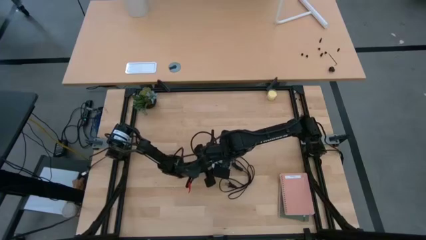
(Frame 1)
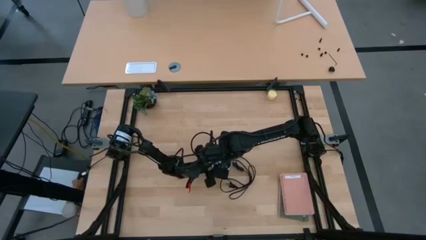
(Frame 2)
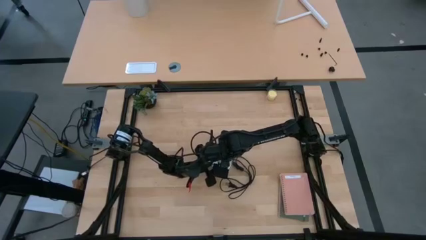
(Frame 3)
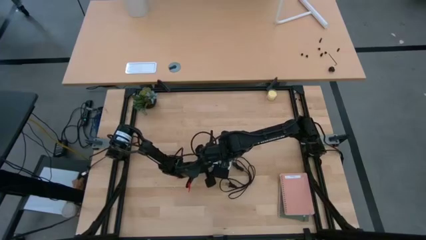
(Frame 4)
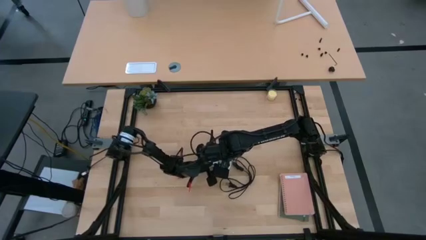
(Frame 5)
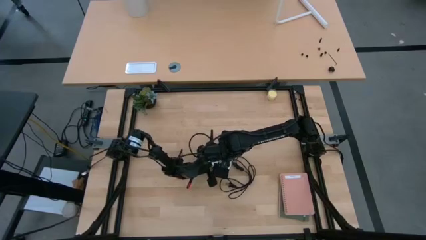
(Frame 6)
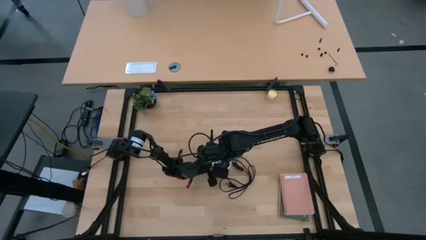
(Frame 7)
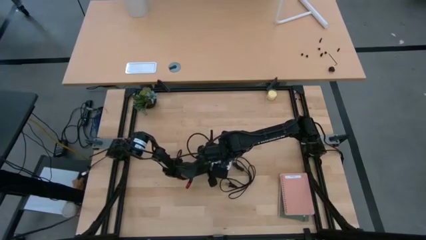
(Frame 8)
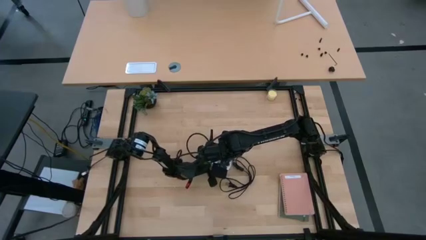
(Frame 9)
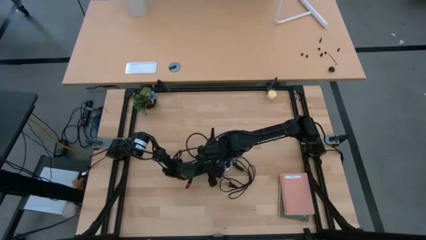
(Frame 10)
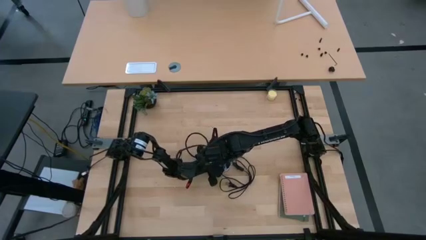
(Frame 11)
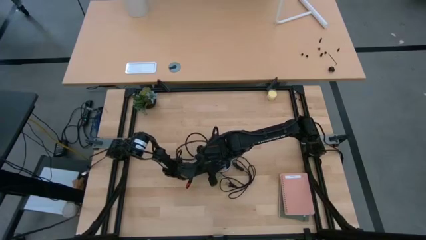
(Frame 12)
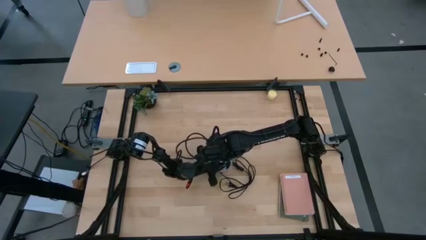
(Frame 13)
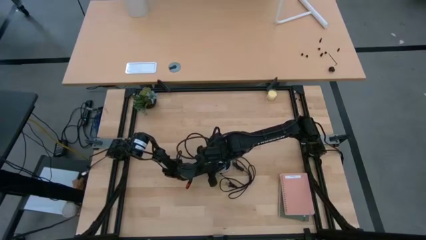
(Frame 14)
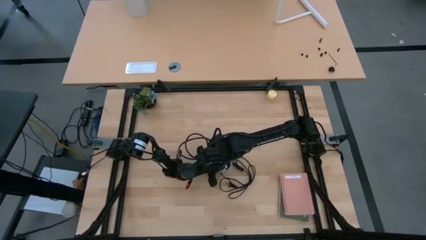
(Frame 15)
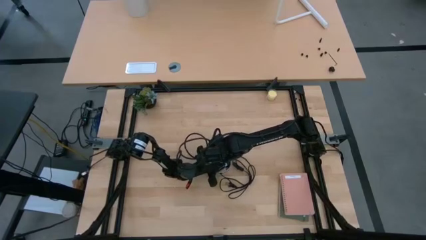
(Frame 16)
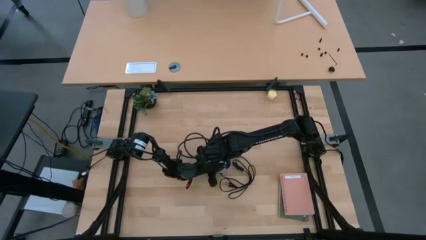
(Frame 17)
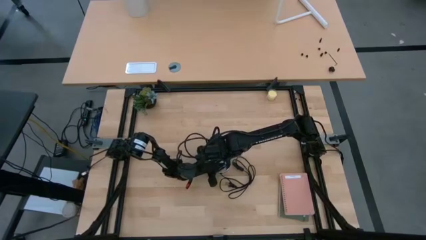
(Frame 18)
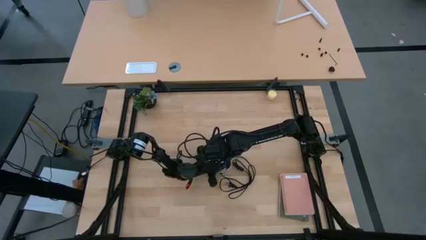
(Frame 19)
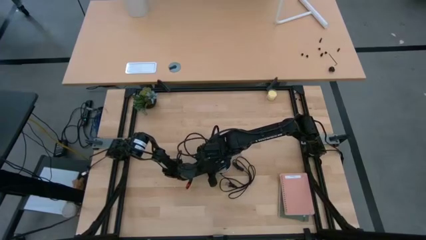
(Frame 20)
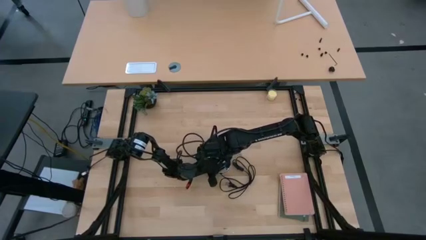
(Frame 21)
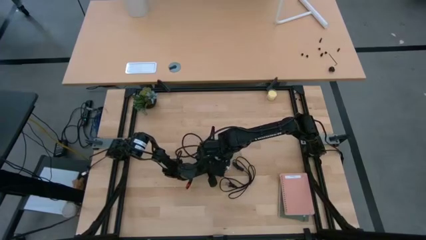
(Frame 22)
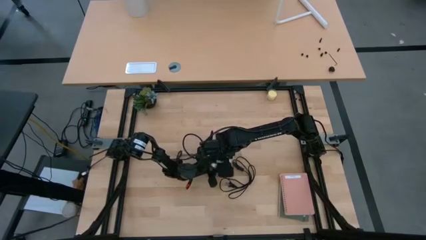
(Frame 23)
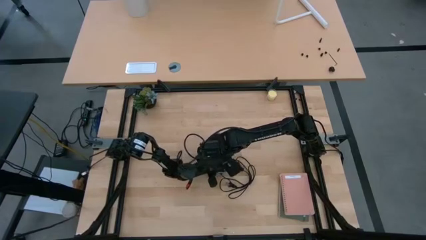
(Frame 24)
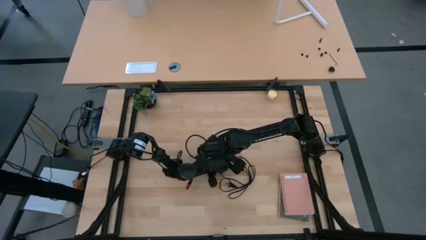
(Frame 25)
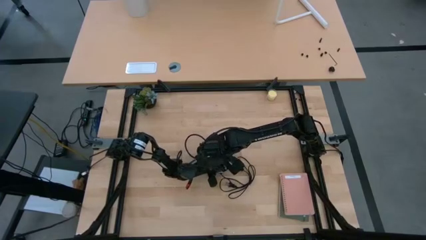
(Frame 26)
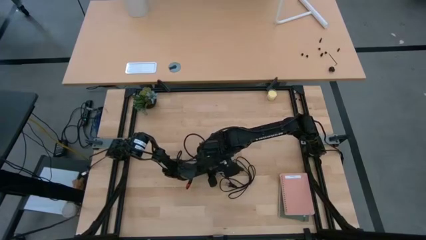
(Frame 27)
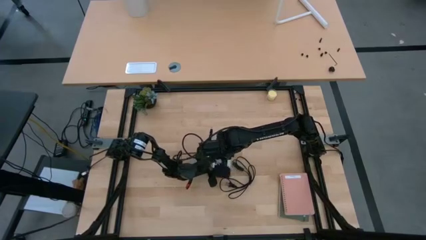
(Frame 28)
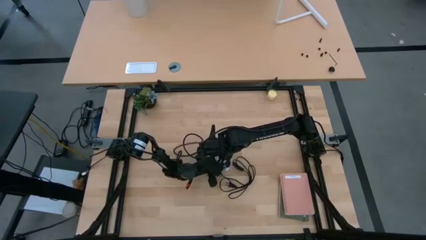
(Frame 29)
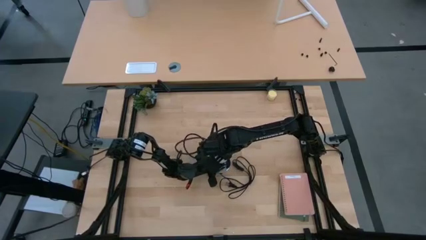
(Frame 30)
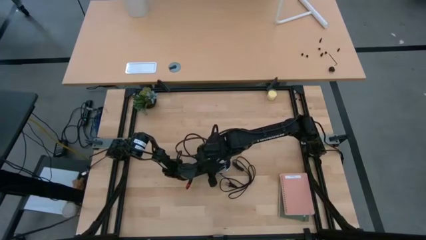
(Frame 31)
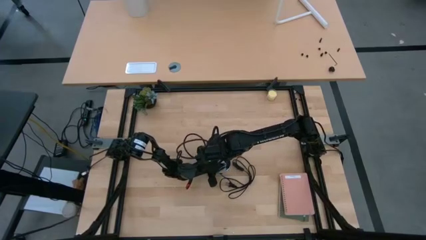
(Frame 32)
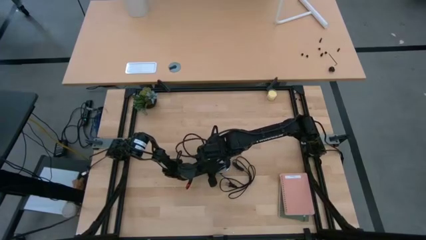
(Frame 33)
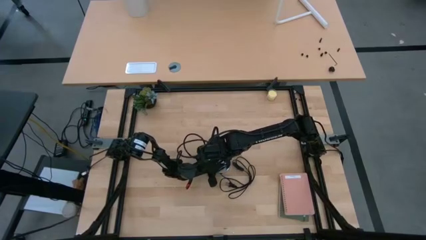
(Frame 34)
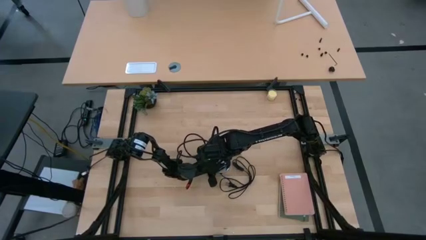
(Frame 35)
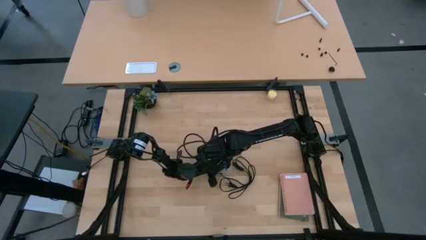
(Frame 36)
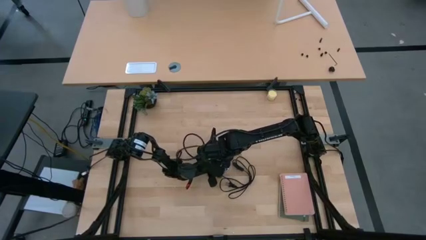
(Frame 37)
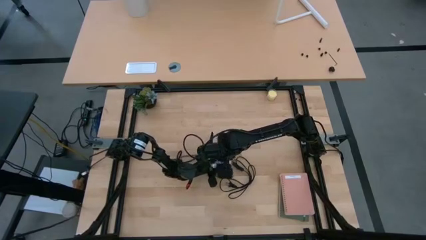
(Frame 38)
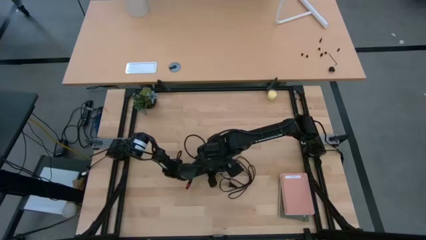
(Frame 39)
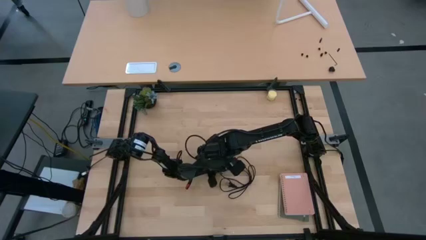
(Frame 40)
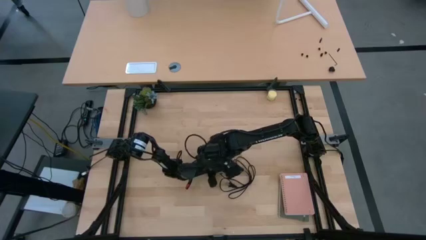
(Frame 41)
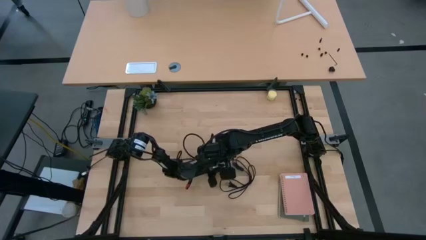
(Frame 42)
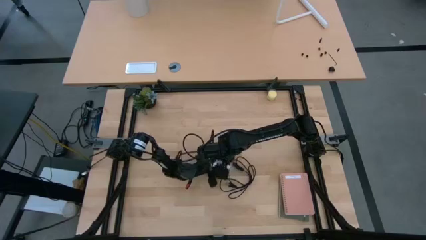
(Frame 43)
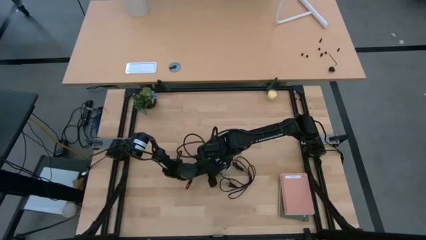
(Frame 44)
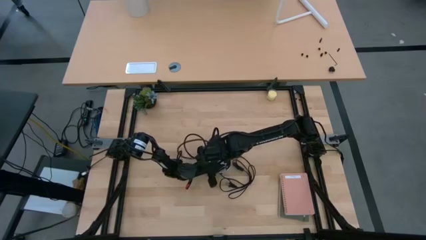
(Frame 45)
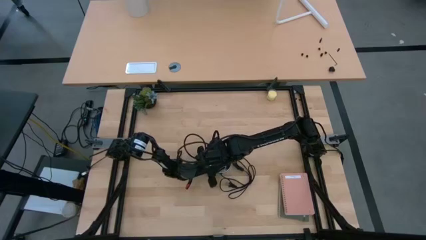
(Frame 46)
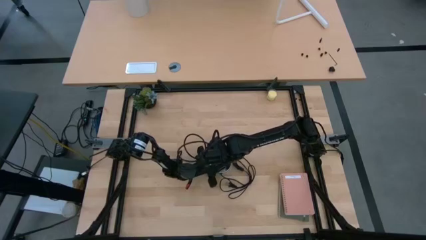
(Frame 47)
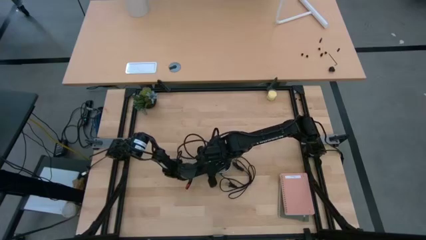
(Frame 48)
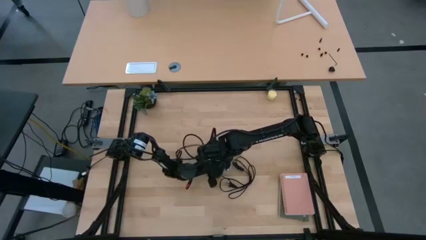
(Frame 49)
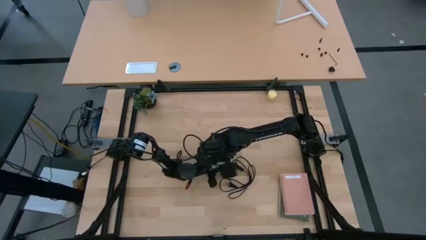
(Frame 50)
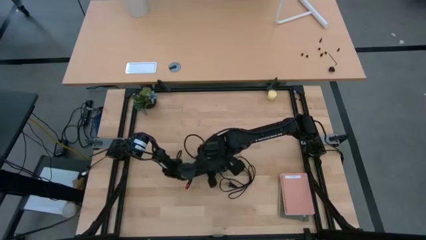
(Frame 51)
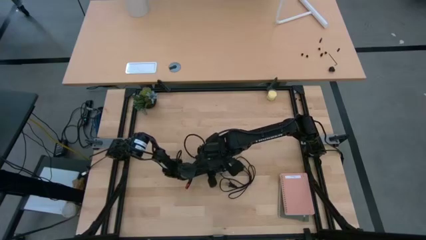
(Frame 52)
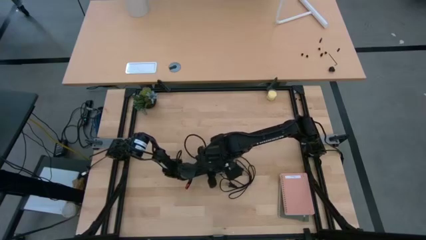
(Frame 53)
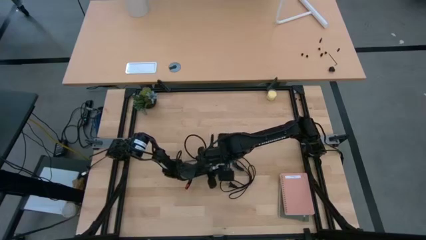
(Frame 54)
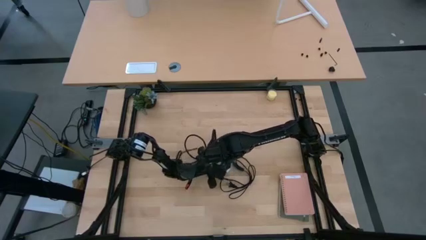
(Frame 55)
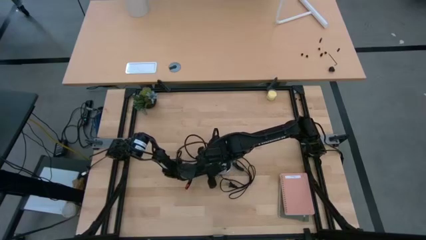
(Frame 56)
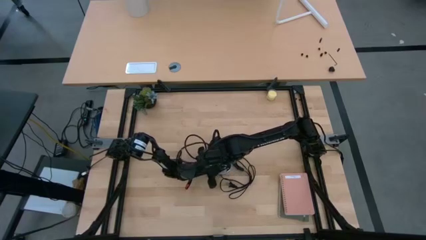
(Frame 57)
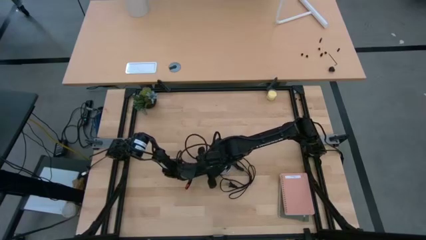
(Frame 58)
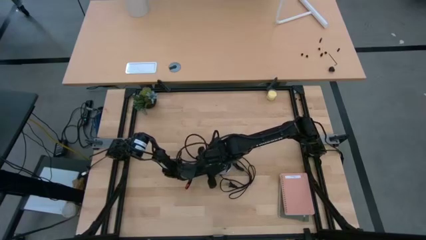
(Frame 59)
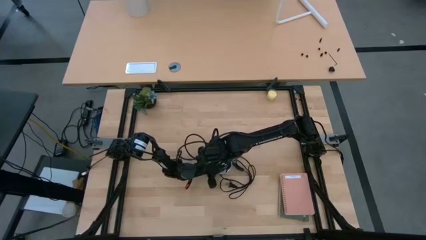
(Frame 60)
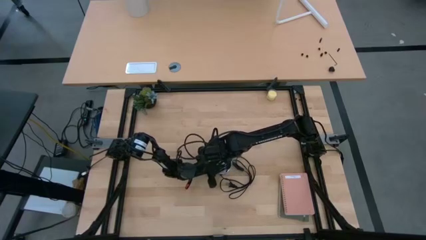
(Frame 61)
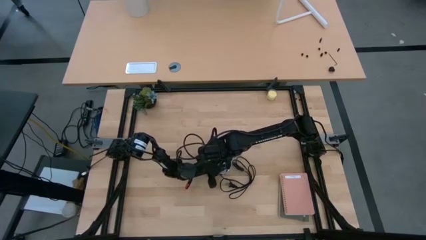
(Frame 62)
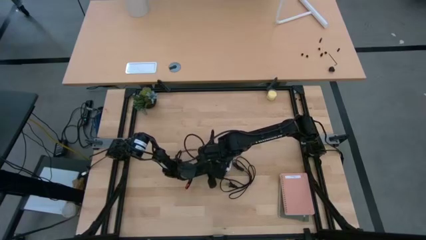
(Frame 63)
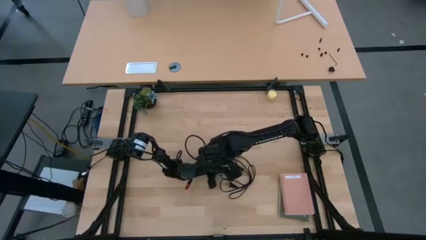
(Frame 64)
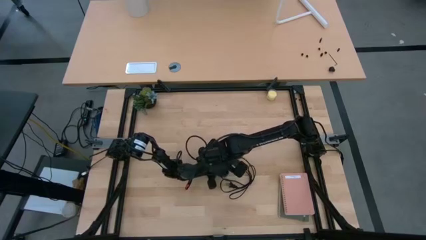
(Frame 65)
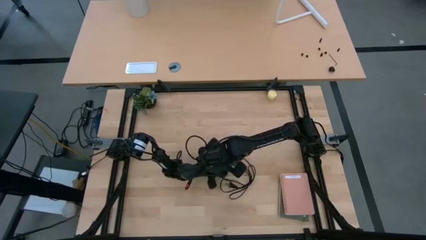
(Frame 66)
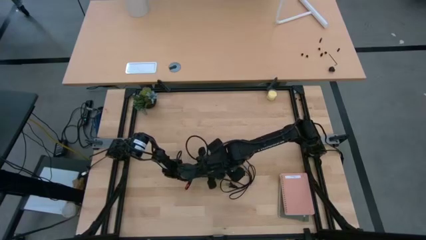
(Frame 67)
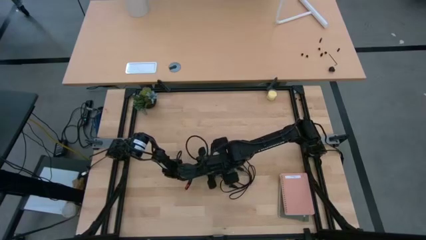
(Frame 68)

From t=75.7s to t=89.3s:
Task: Screw lightbulb
Remove the light bulb from the lamp

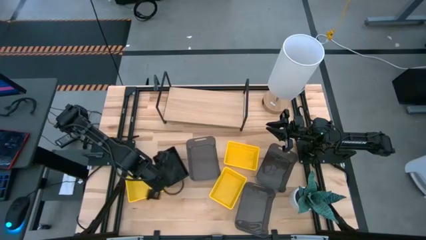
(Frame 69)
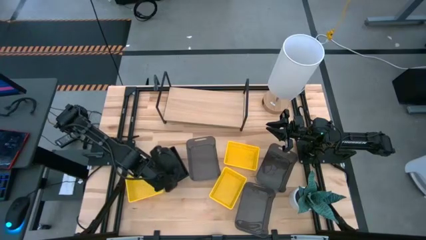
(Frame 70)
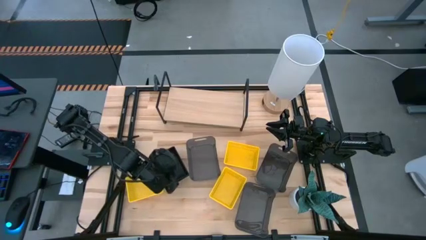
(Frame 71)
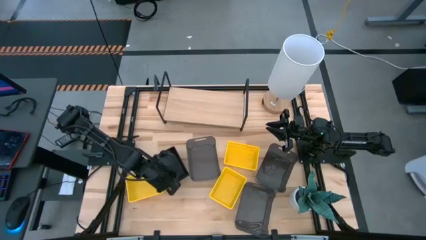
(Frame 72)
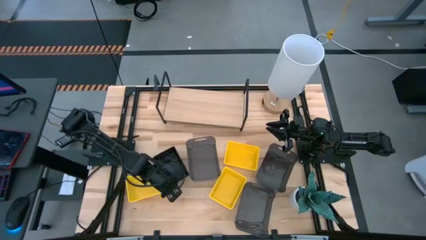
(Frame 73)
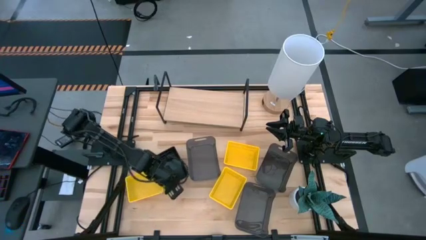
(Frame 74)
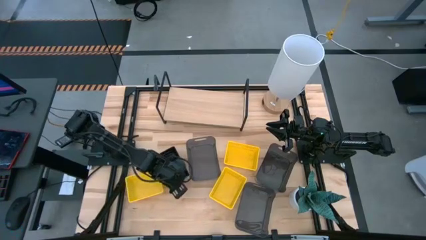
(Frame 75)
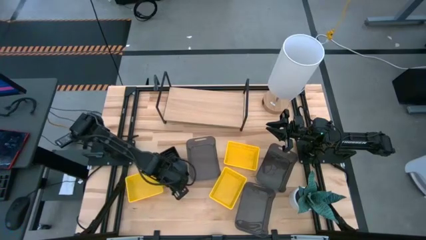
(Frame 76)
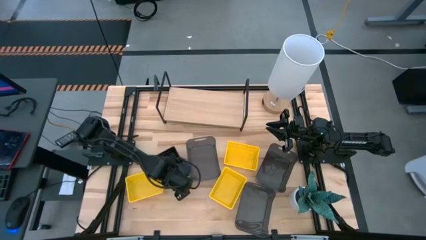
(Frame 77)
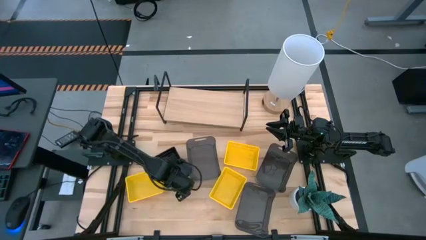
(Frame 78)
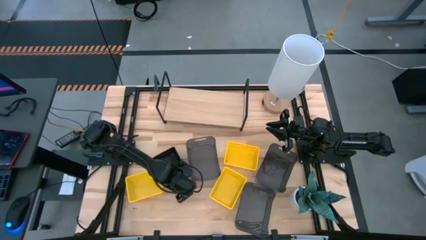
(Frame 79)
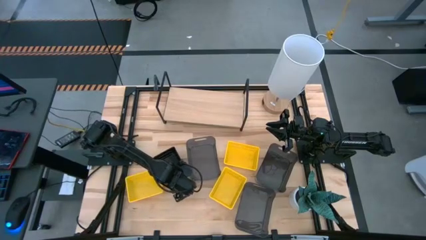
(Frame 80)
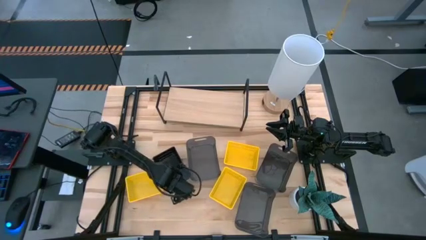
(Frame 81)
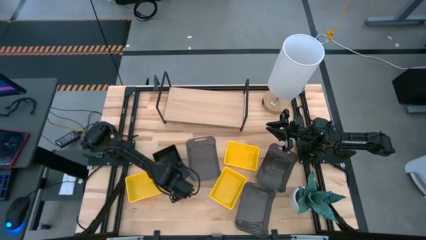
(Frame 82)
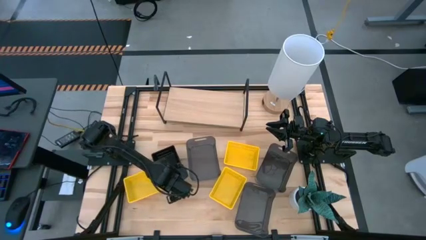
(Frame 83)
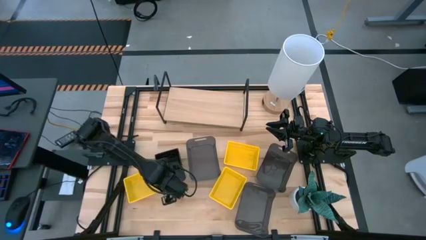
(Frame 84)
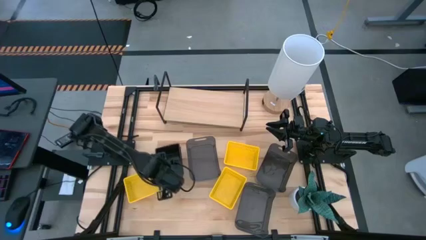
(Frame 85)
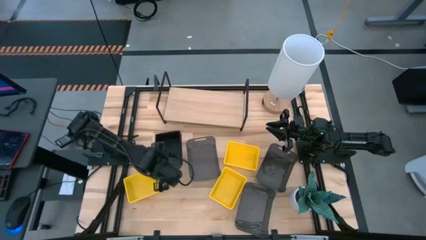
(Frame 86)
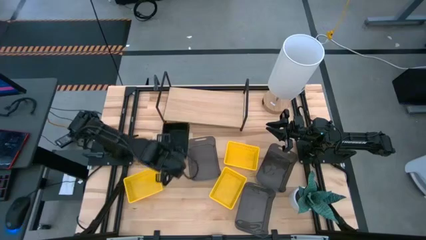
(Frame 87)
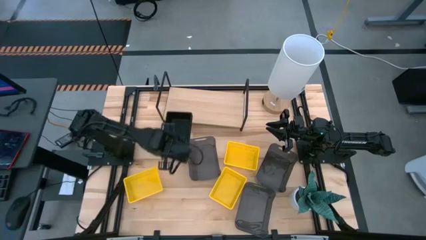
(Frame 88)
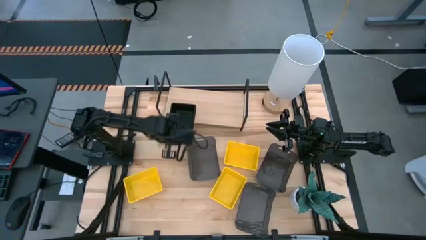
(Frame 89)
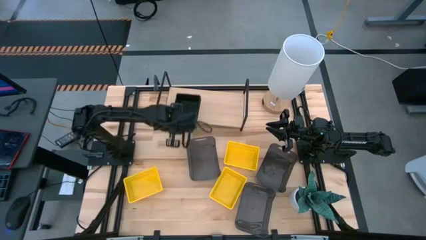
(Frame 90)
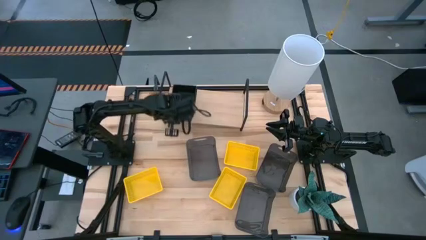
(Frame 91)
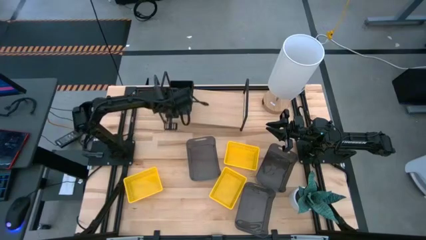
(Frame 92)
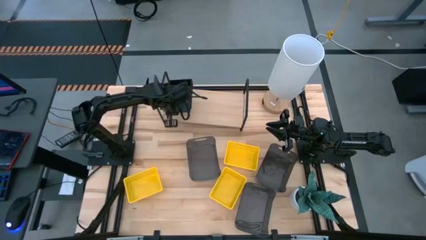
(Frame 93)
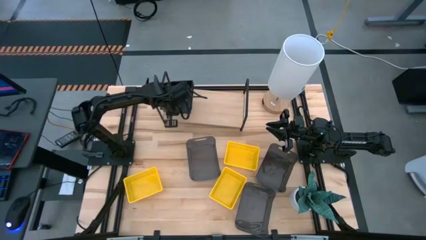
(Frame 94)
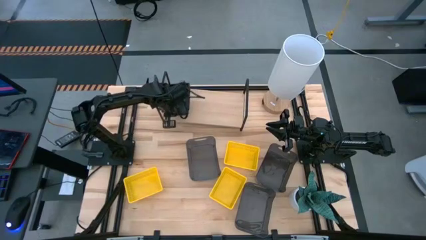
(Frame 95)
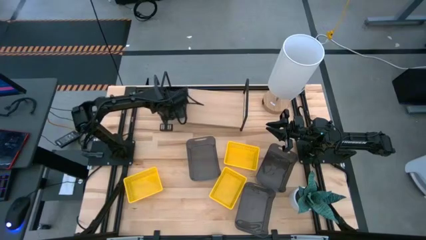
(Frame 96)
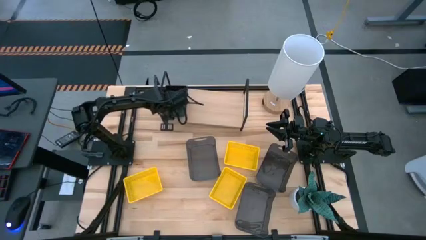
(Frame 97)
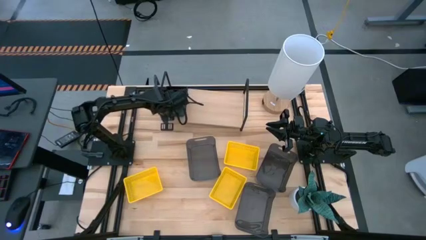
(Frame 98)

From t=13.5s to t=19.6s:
Task: Stack baskets on shelf by color
Put the stacked black basket on the shelf
